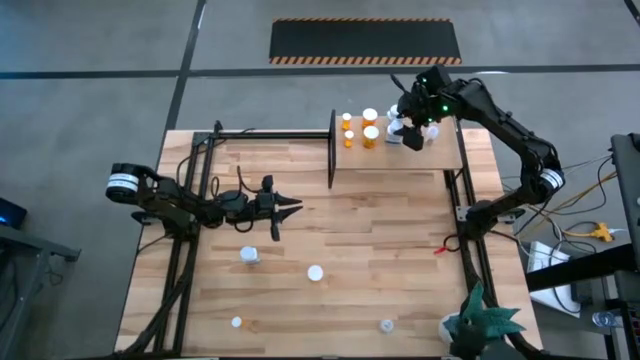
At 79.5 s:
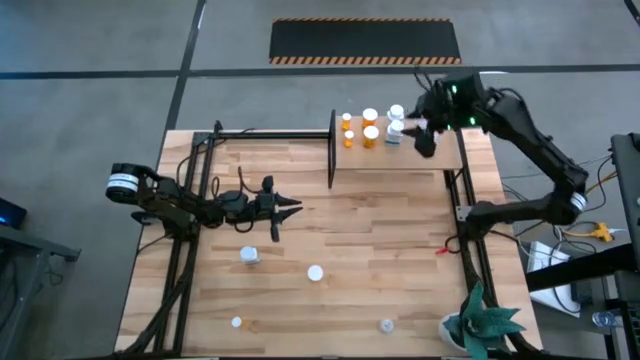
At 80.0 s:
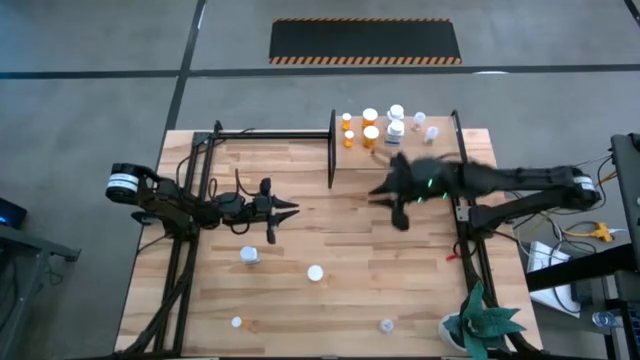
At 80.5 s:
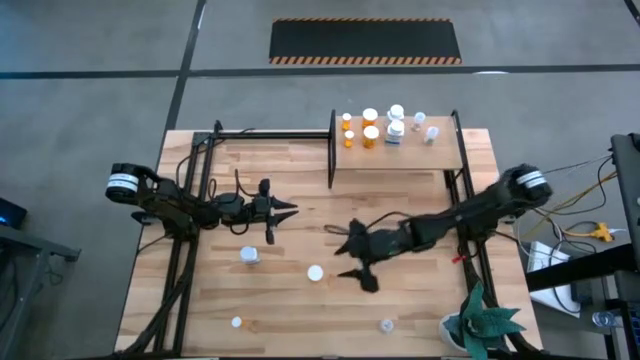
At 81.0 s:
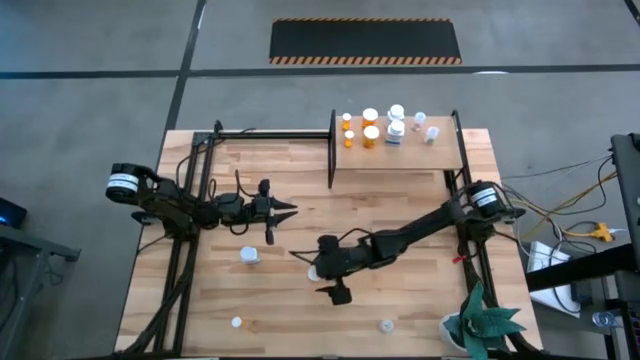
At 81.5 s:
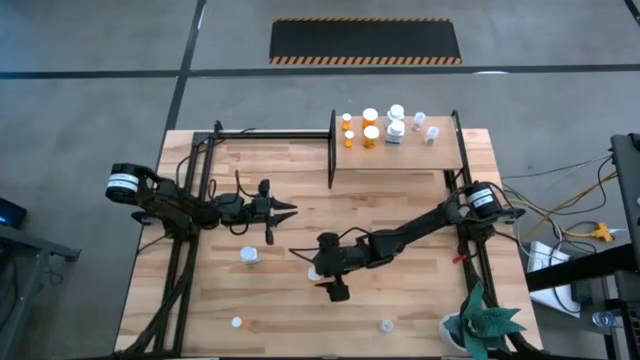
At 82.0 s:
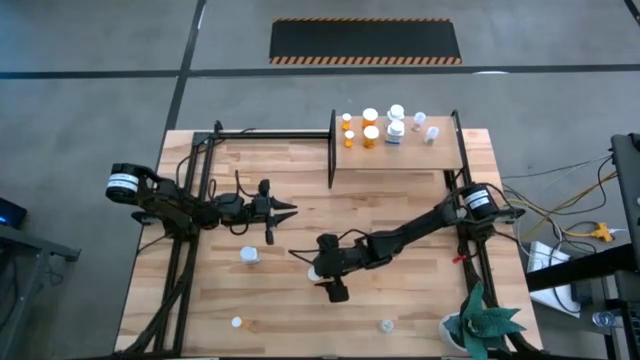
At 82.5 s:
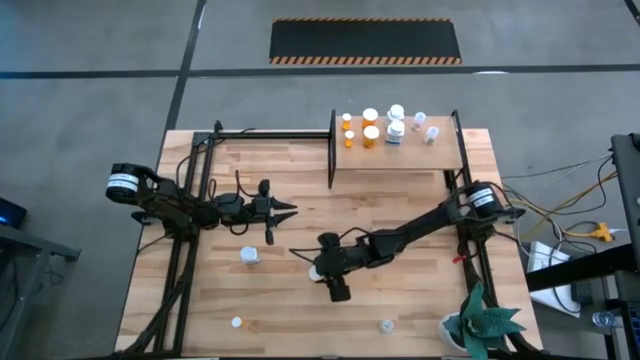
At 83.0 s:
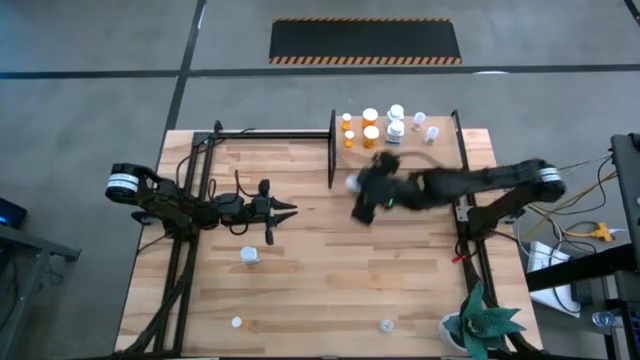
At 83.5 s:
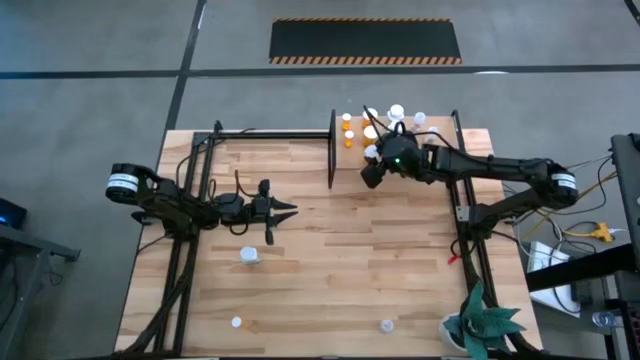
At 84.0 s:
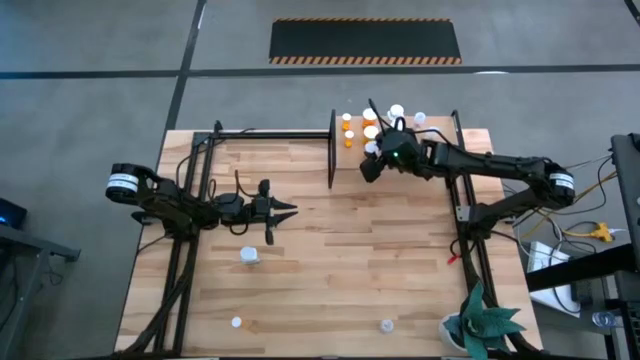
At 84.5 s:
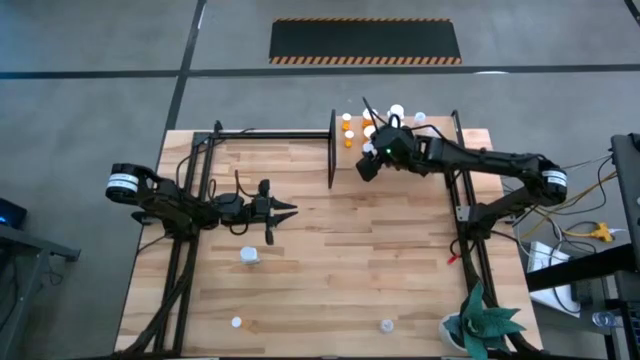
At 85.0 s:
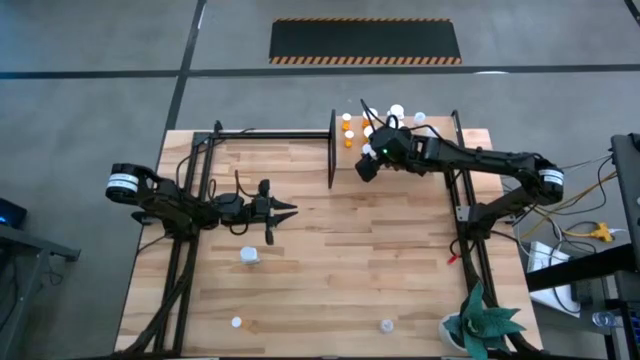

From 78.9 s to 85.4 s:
Task: Pick and place medicine bottles onto shelf by color
Put the big orange pill bottle on the shelf aligned with the other big orange pill bottles

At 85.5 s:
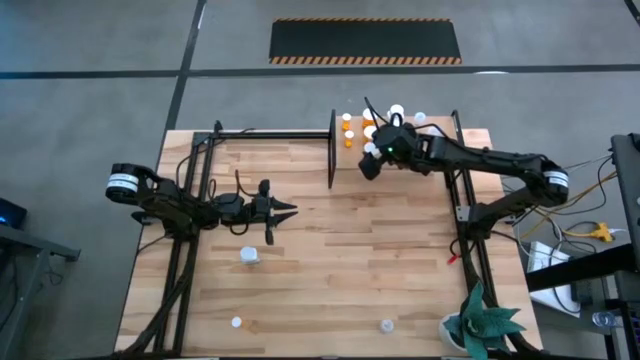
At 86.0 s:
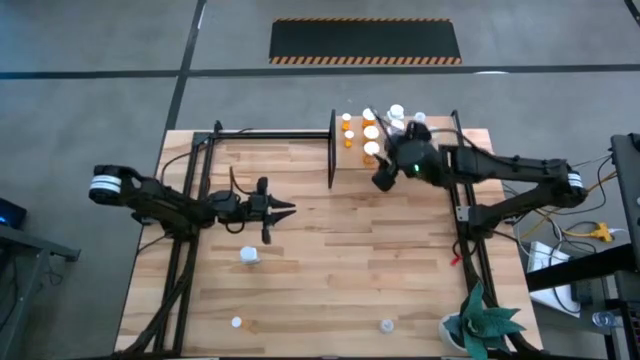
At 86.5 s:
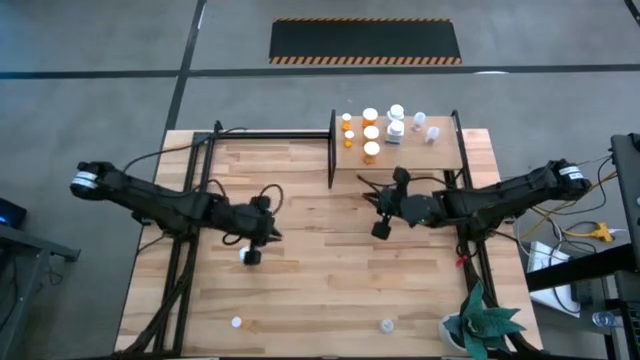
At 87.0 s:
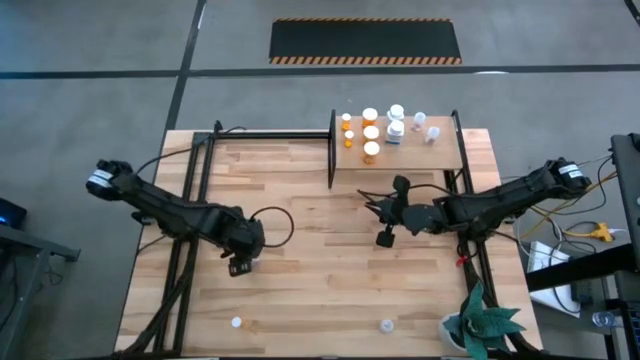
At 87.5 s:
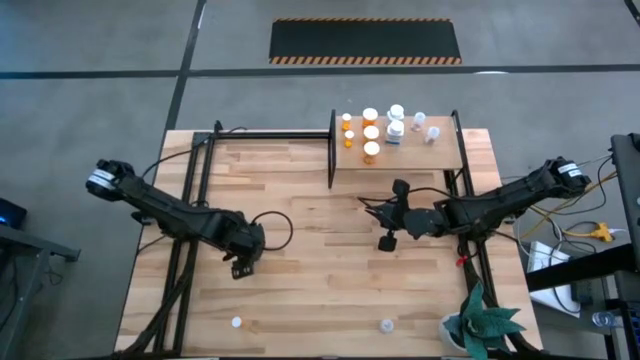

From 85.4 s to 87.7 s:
Put the white pill bottle on the shelf aligned with the other white pill bottles

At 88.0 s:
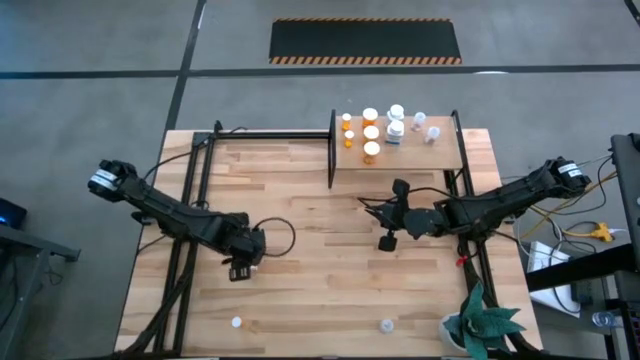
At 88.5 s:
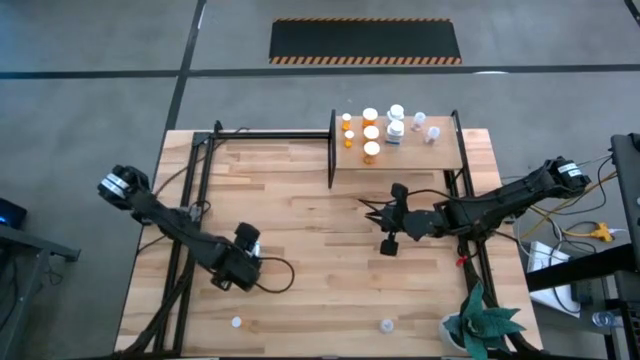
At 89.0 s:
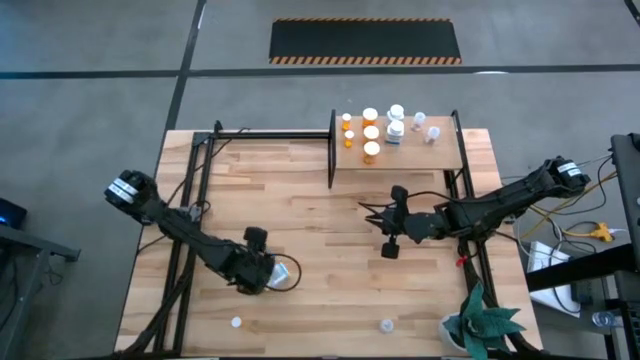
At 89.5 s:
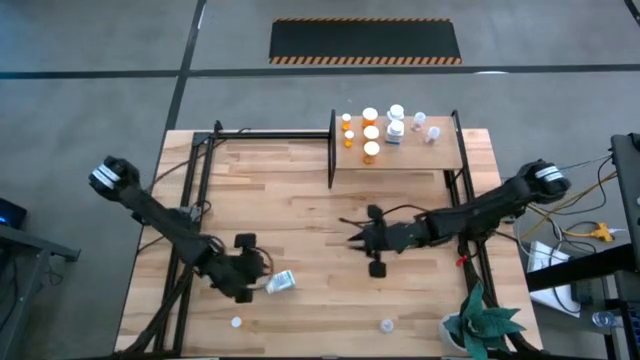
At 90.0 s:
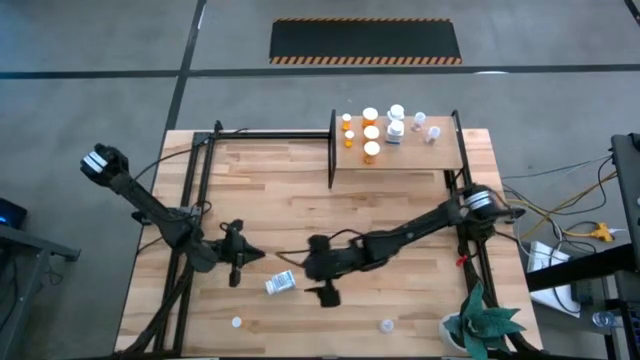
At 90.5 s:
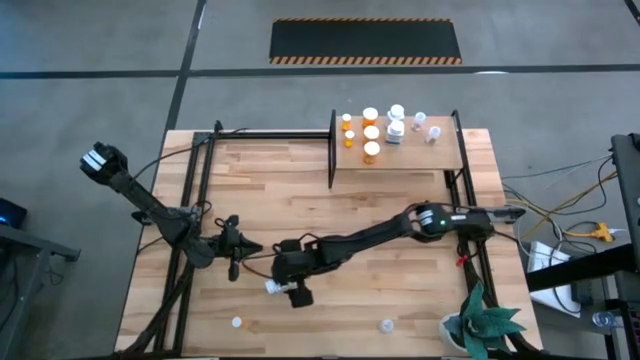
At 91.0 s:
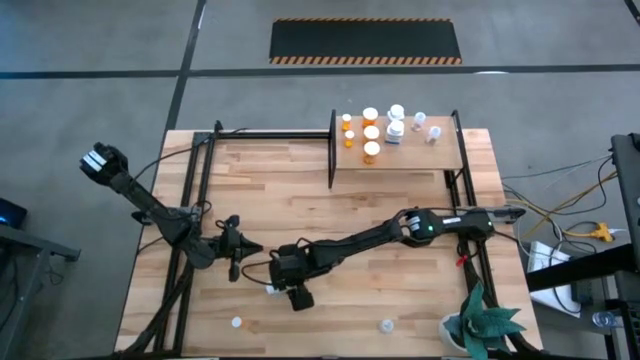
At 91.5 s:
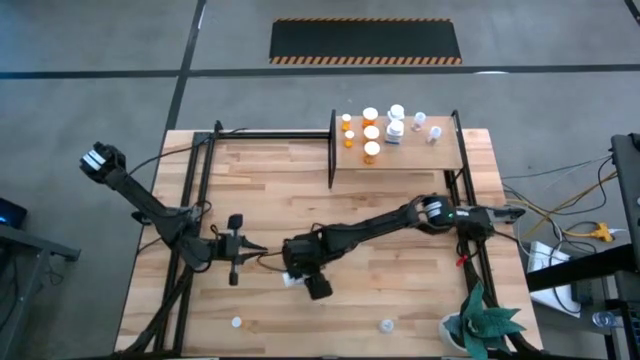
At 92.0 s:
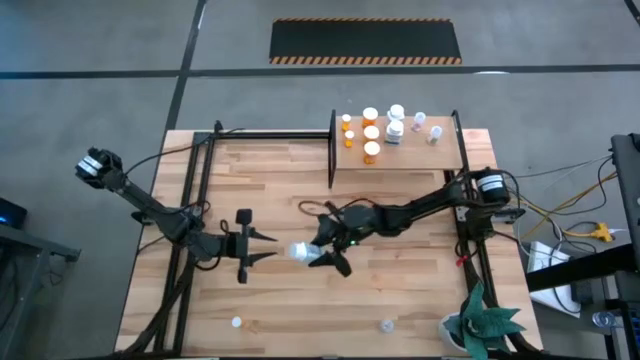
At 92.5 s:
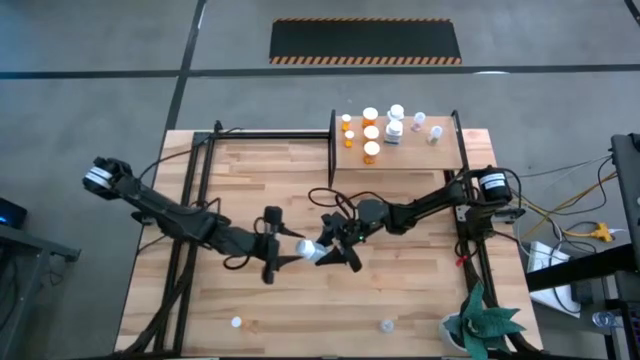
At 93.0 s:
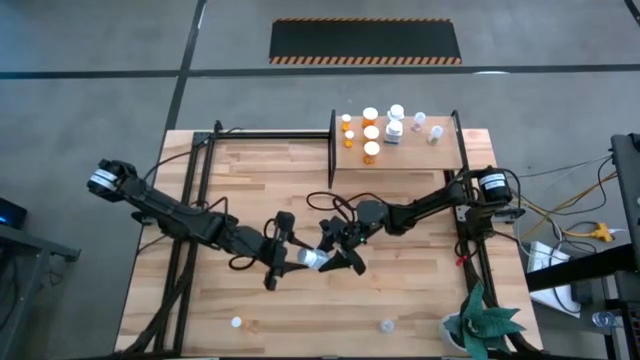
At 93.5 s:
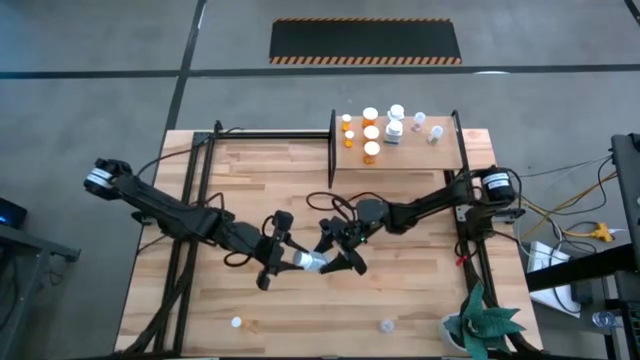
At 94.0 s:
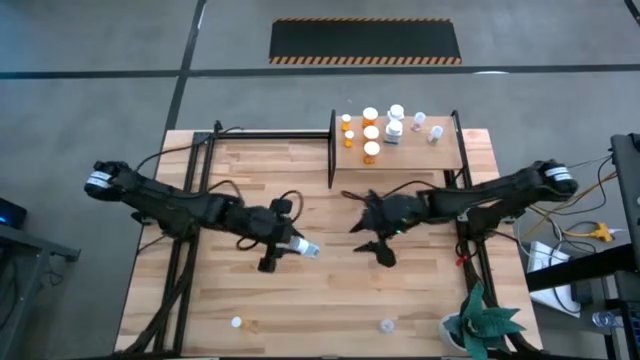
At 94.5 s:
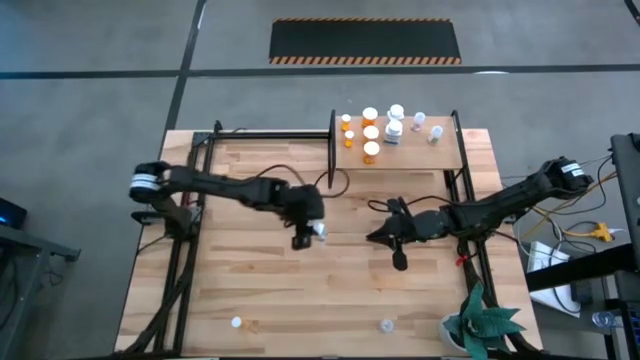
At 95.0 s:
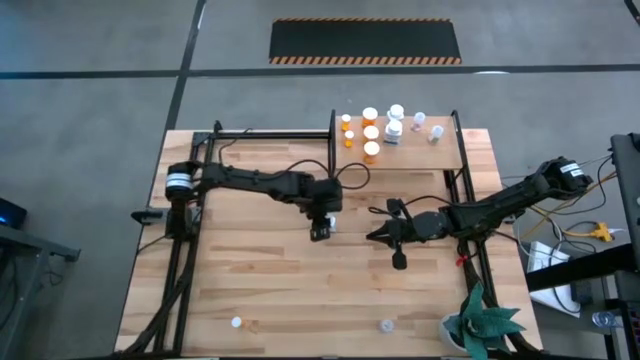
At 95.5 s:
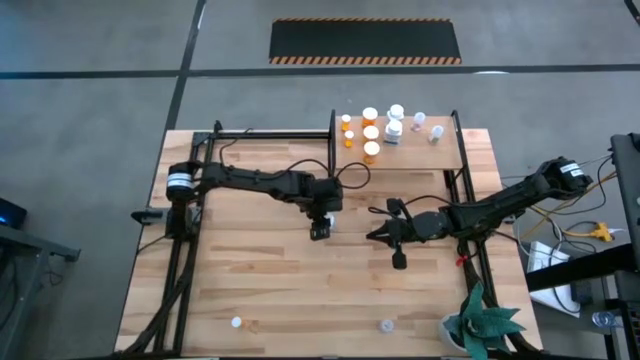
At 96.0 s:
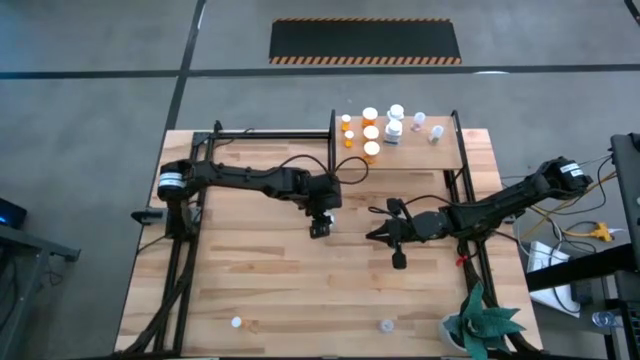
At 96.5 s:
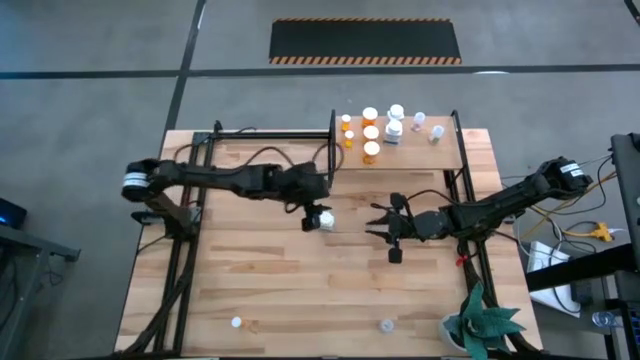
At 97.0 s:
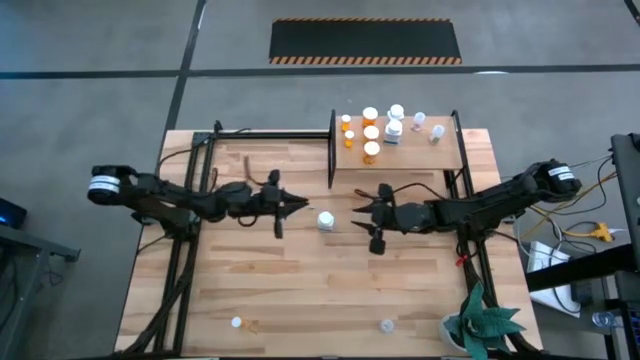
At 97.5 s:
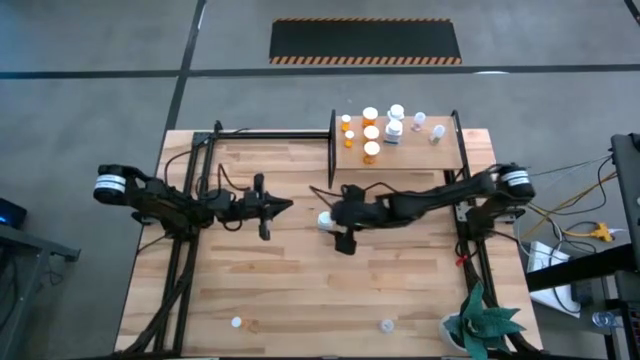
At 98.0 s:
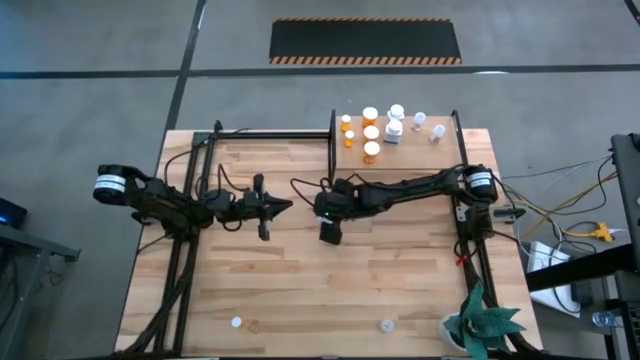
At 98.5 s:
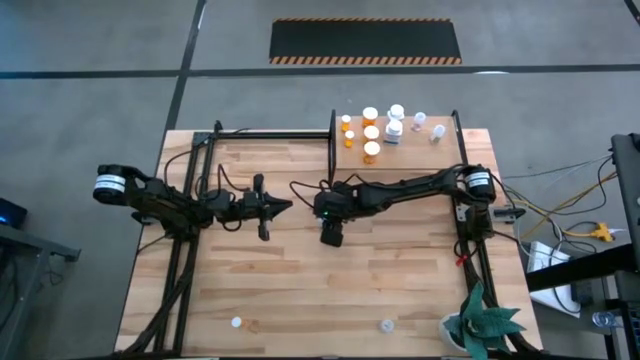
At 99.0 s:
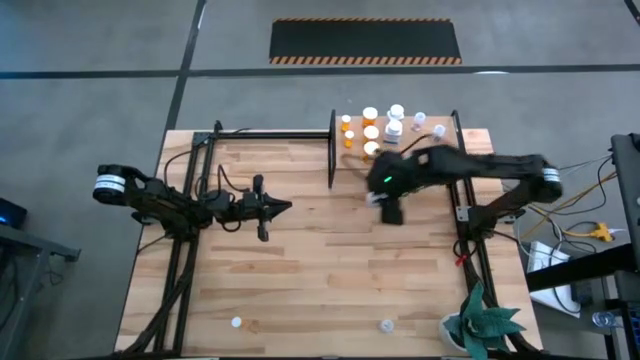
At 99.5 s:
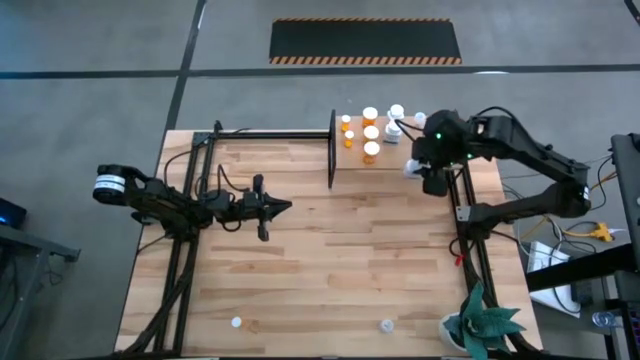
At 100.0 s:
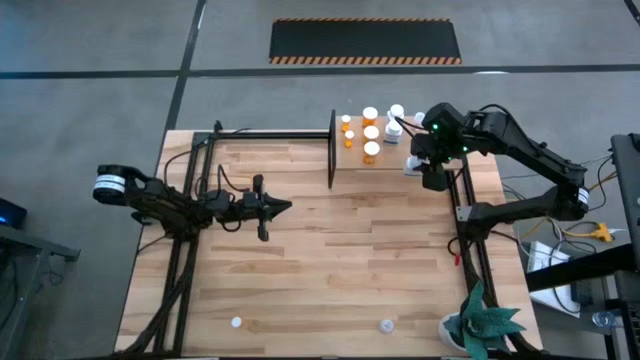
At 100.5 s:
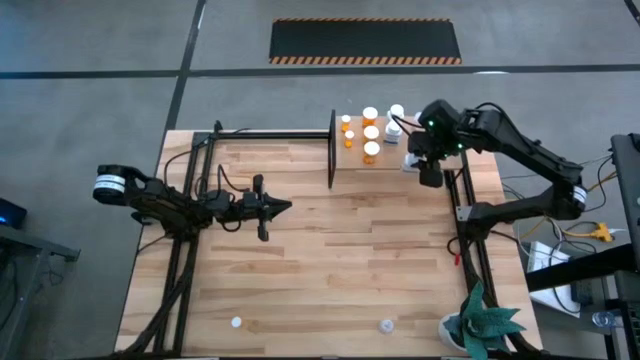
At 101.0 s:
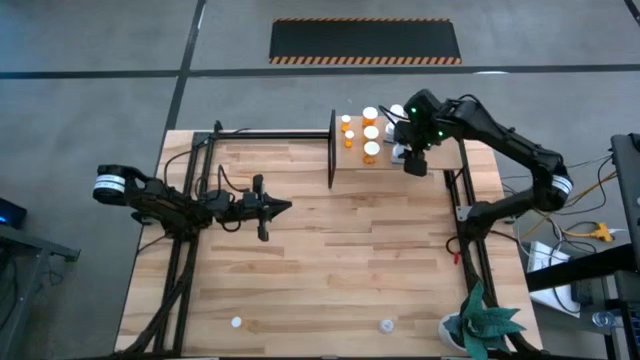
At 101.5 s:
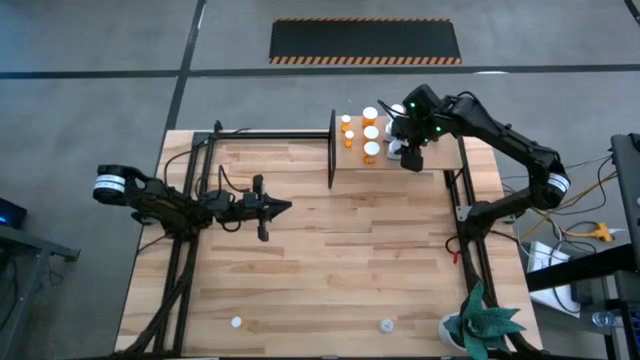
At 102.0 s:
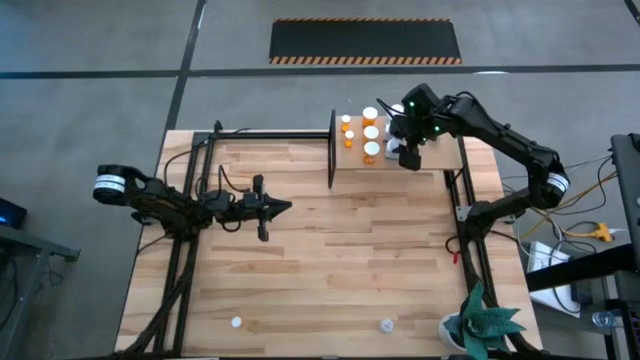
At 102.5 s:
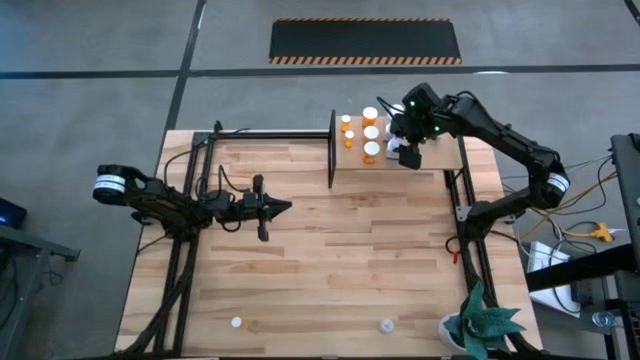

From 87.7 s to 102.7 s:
Put the white pill bottle on the shelf aligned with the other white pill bottles
